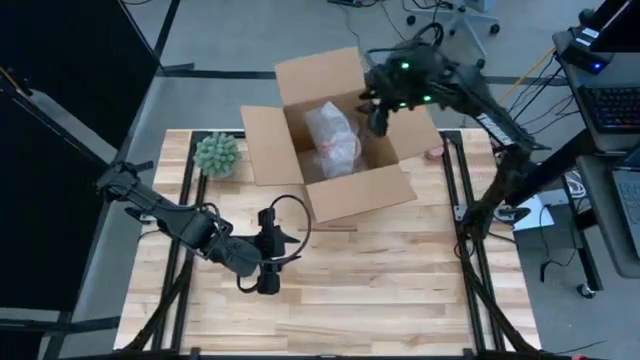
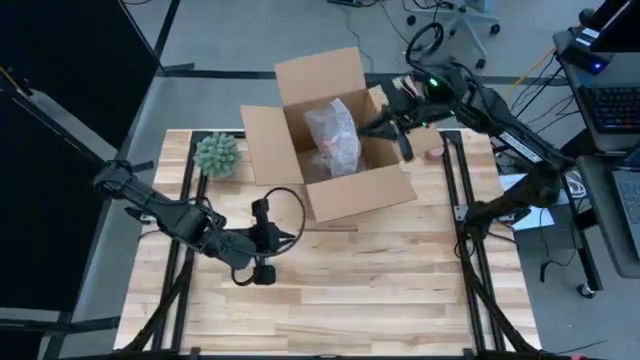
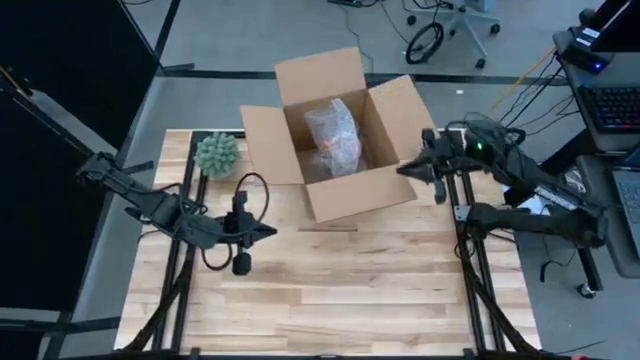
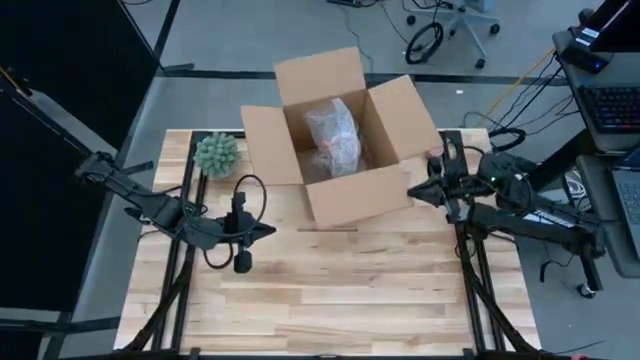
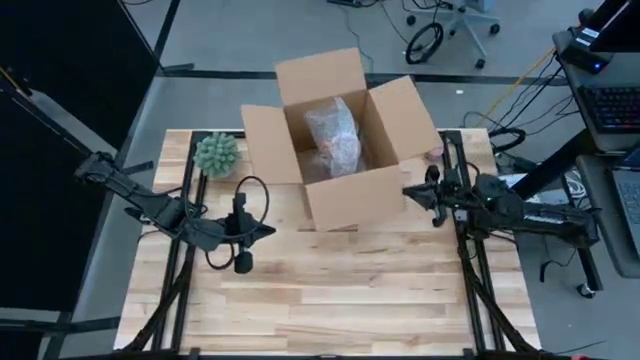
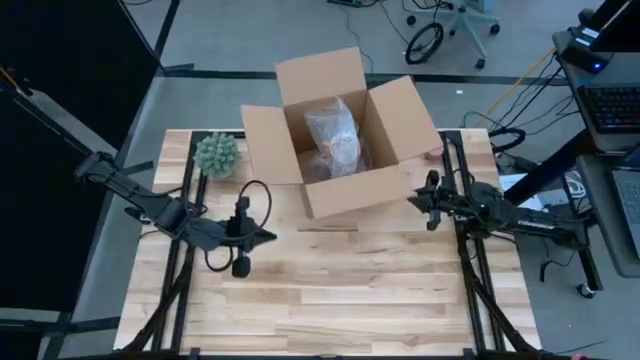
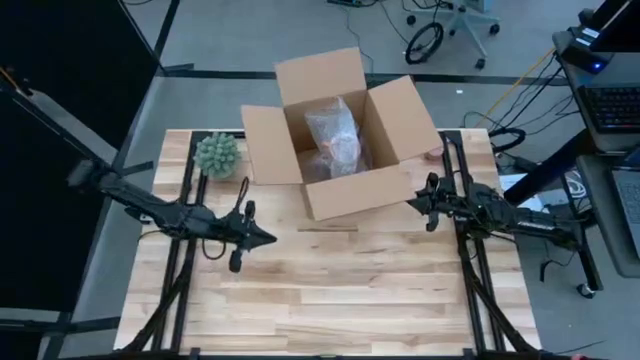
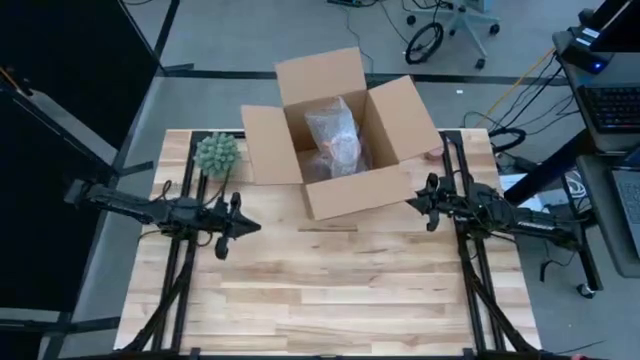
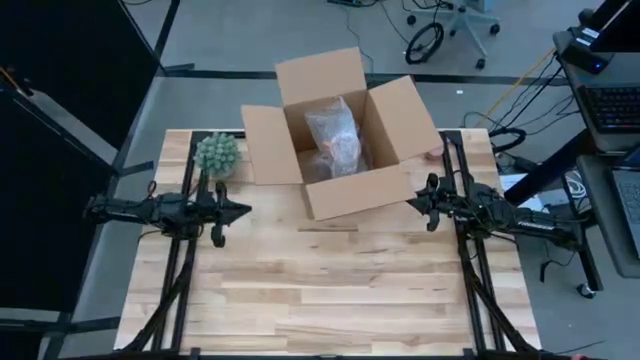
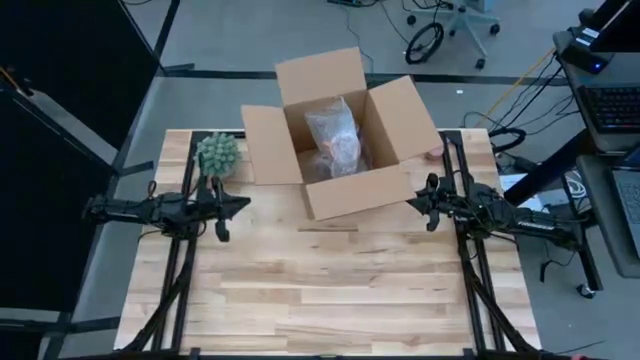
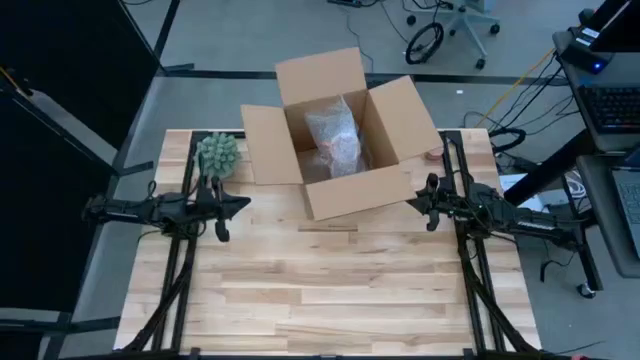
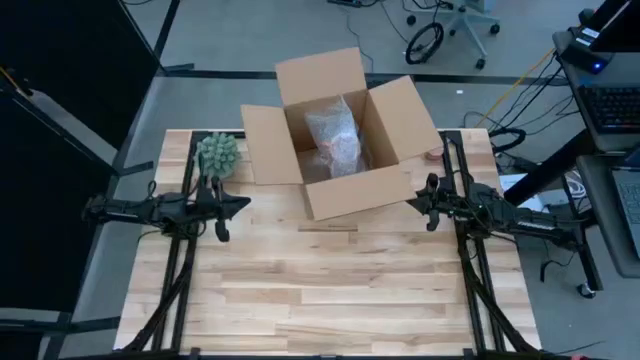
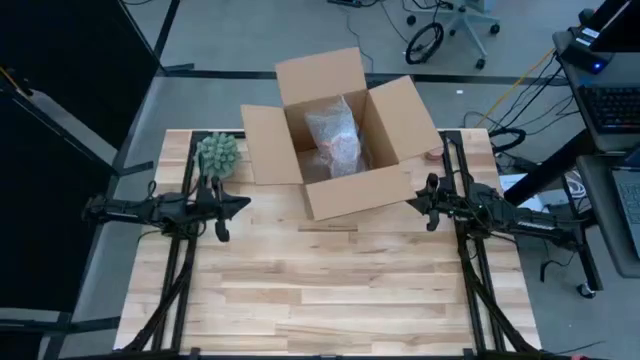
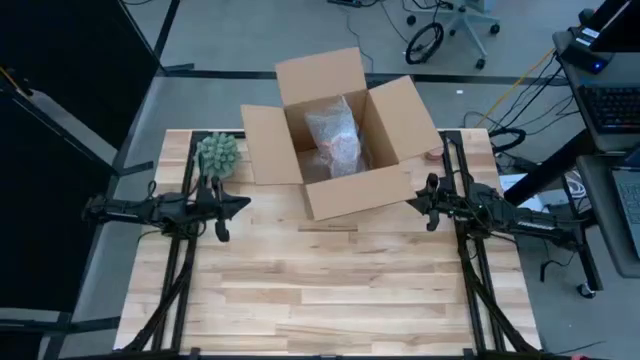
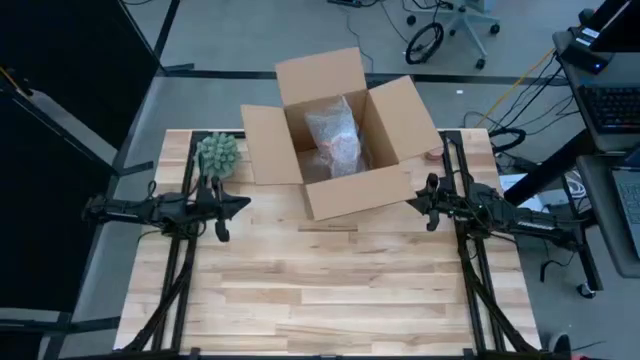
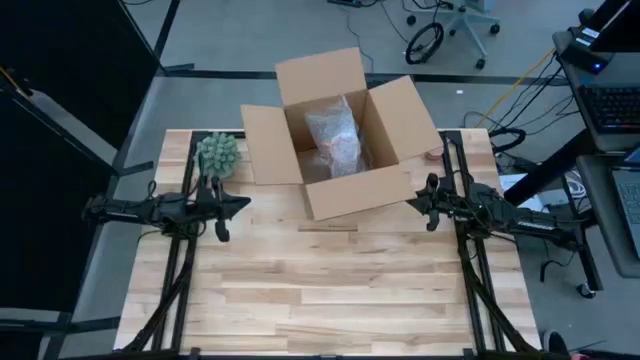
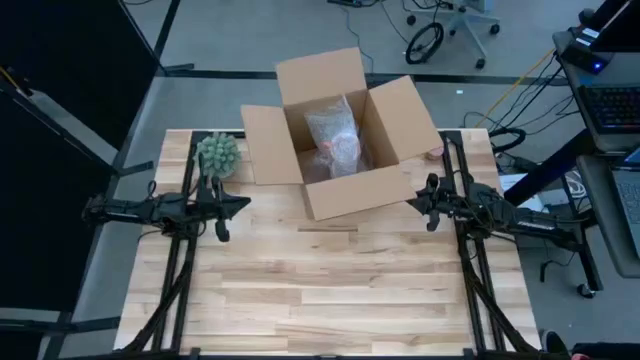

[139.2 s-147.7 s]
Task: wrap mug
Return to Home Position

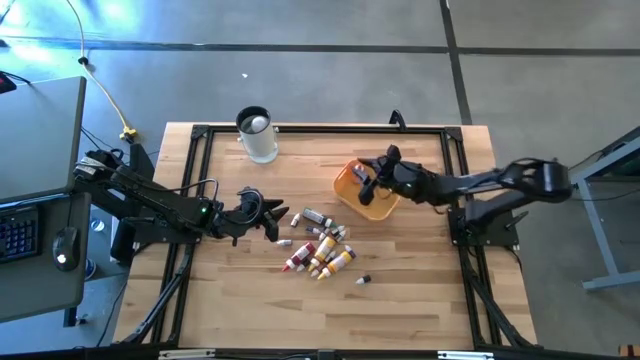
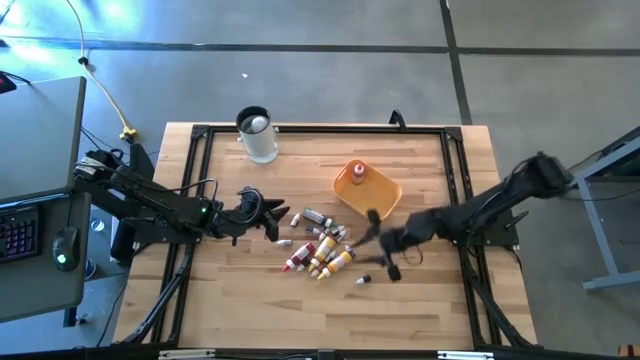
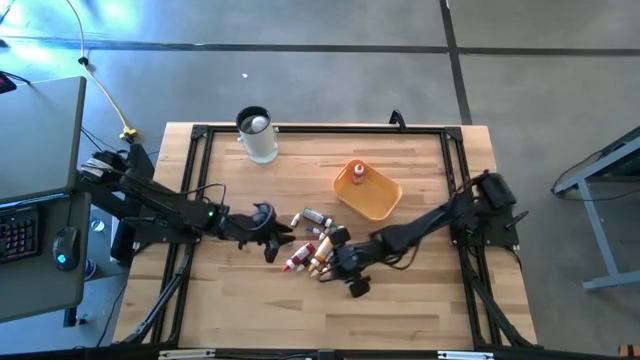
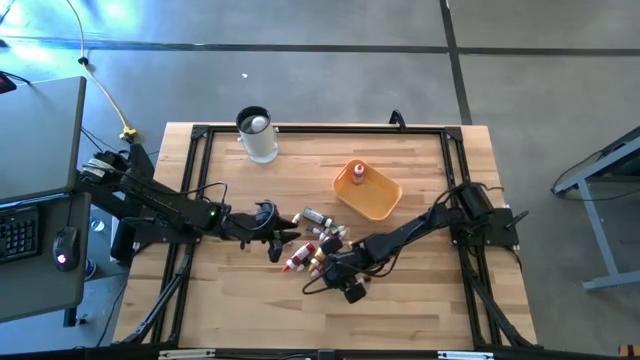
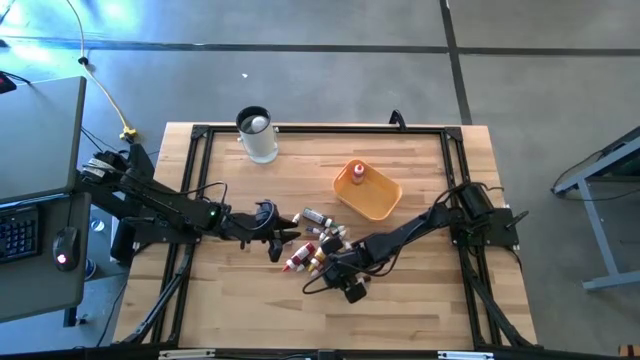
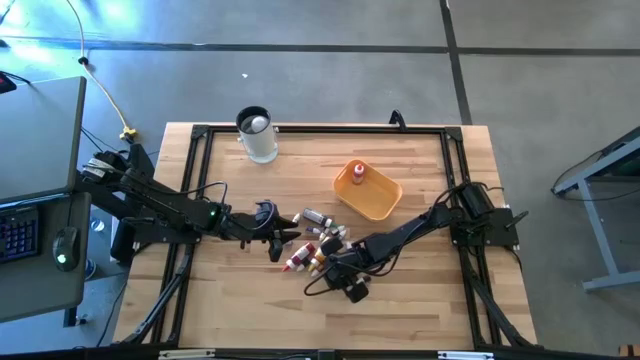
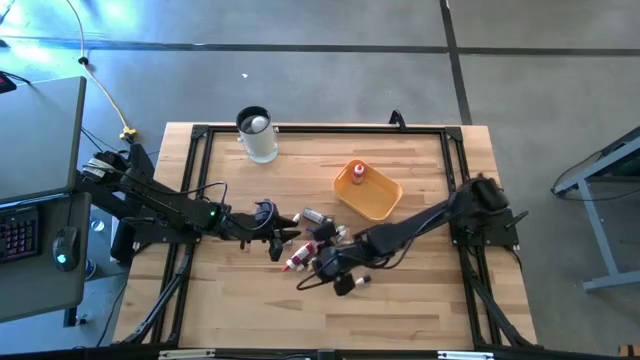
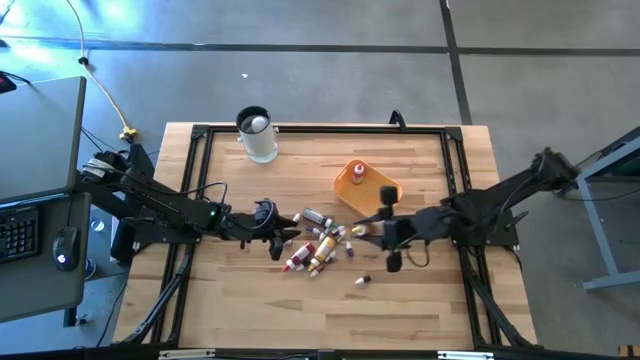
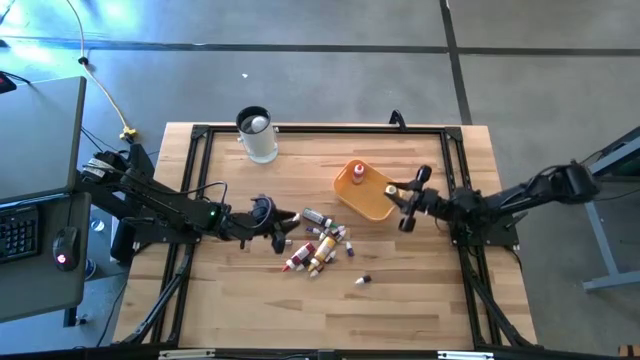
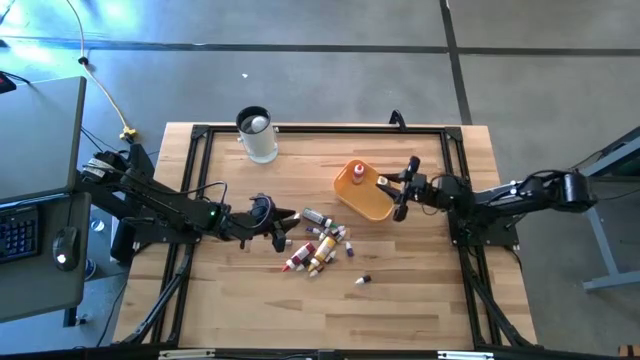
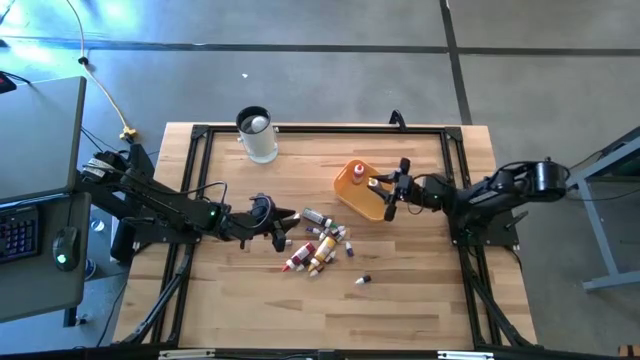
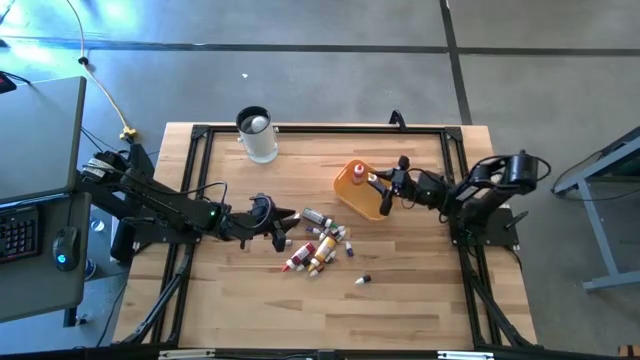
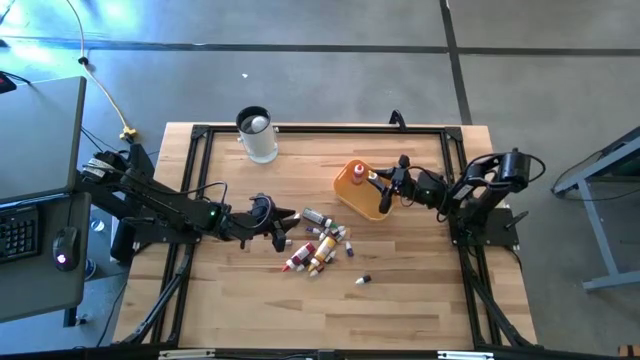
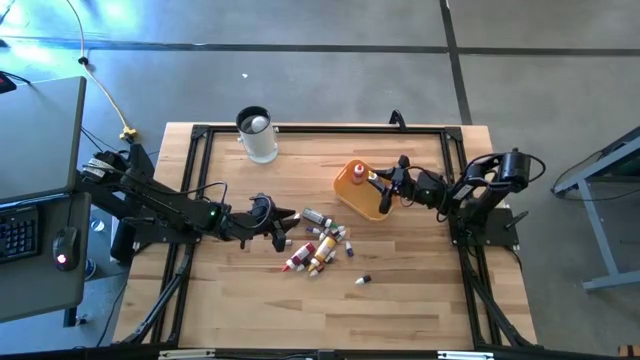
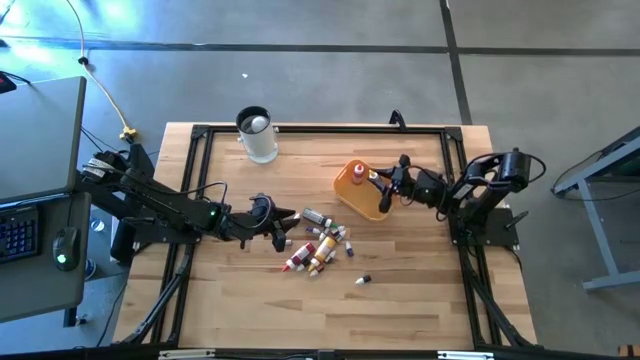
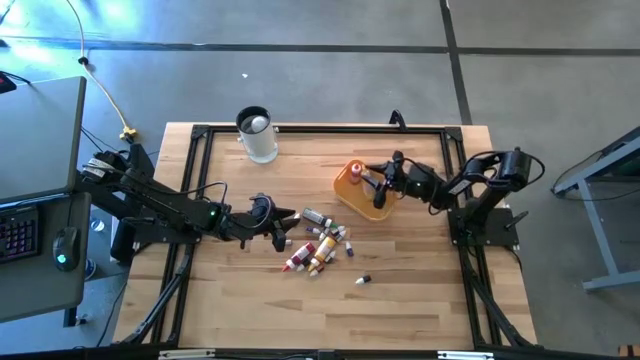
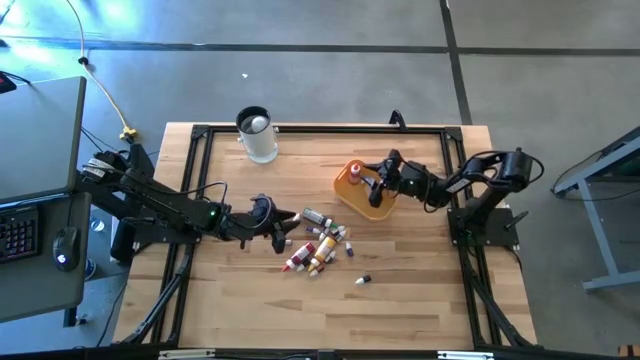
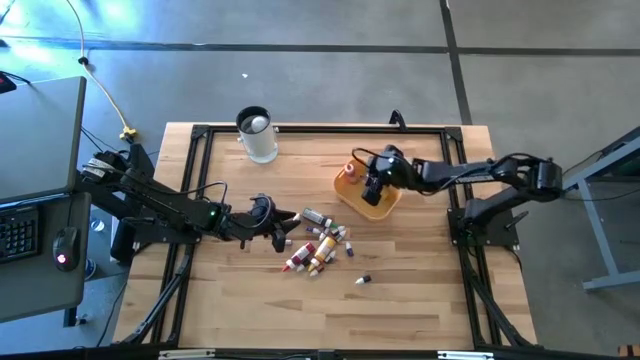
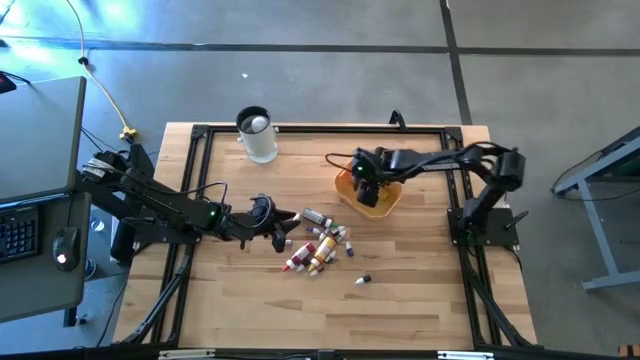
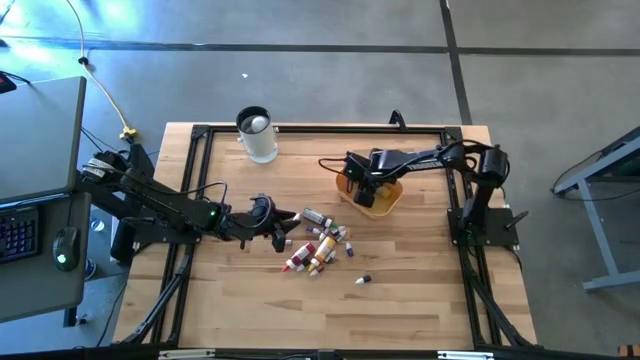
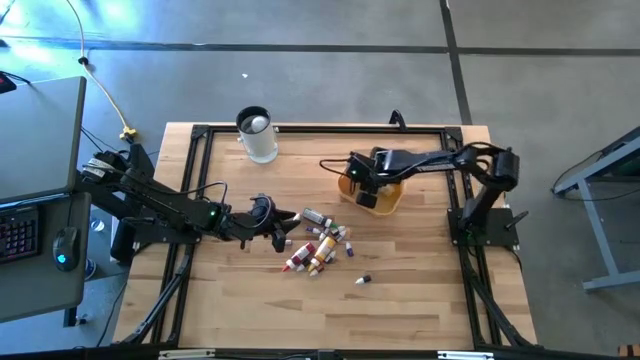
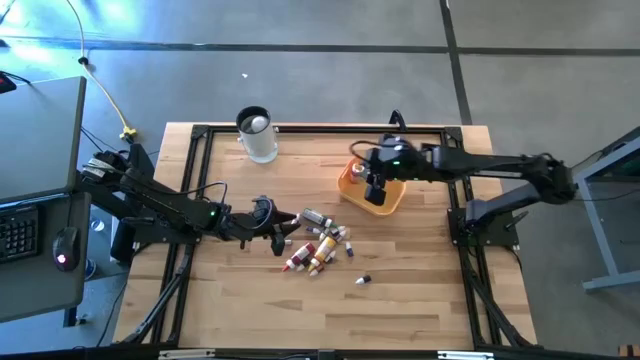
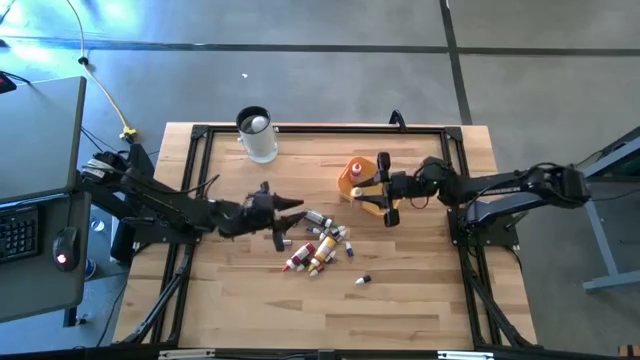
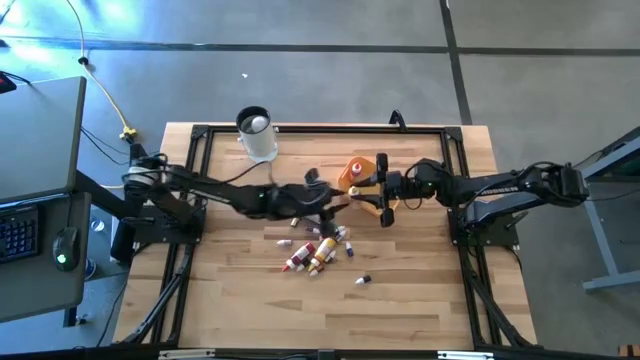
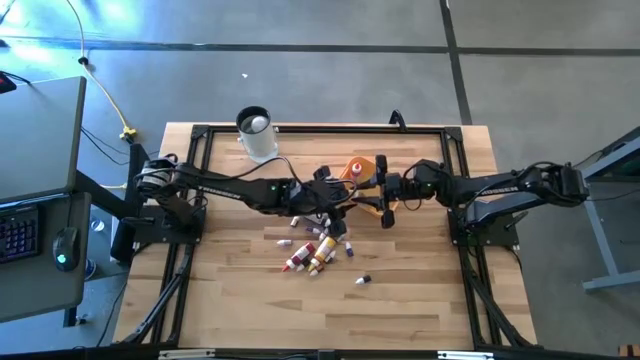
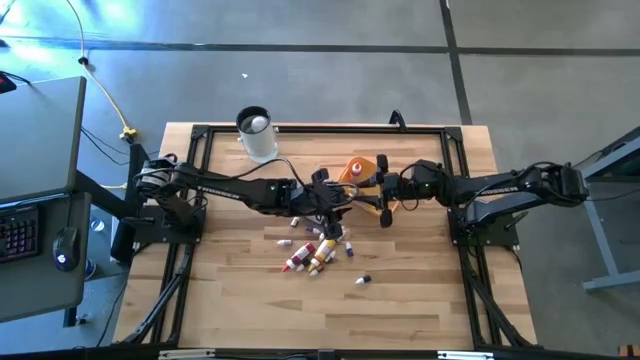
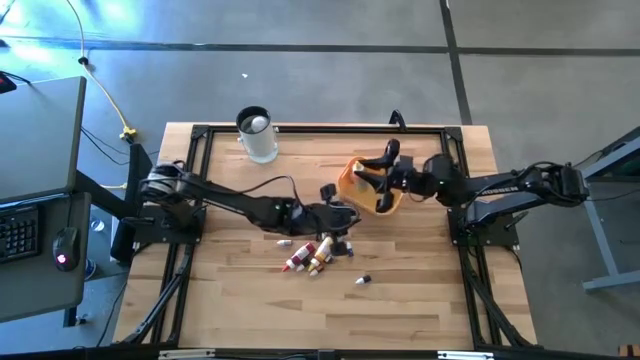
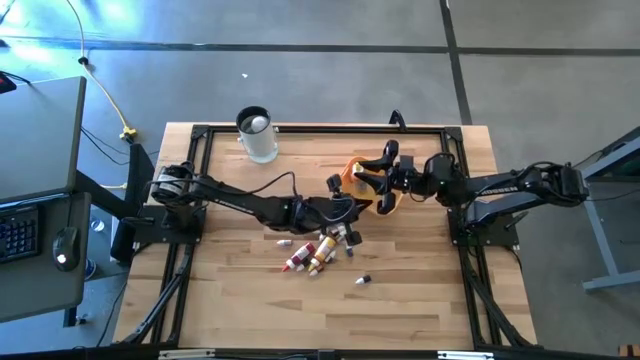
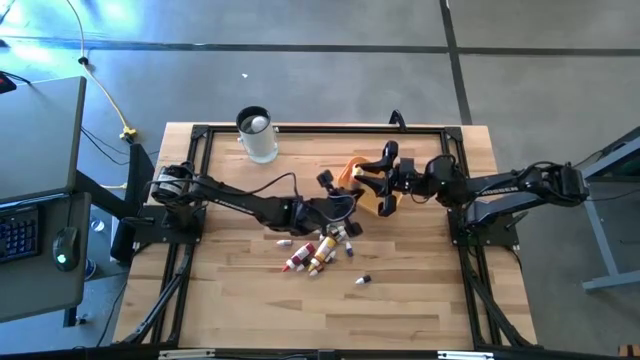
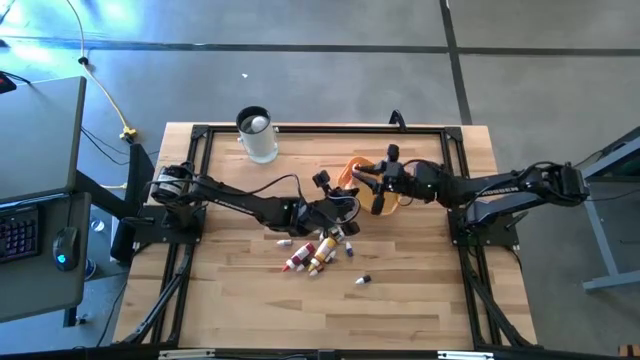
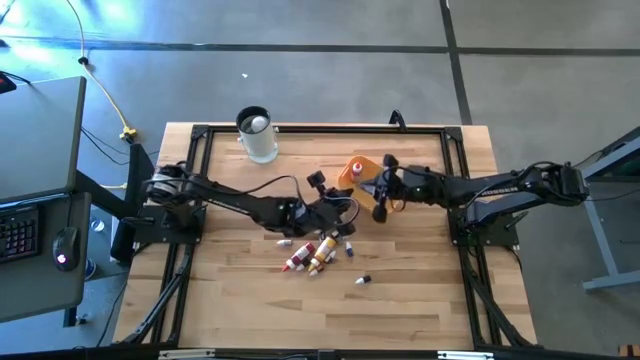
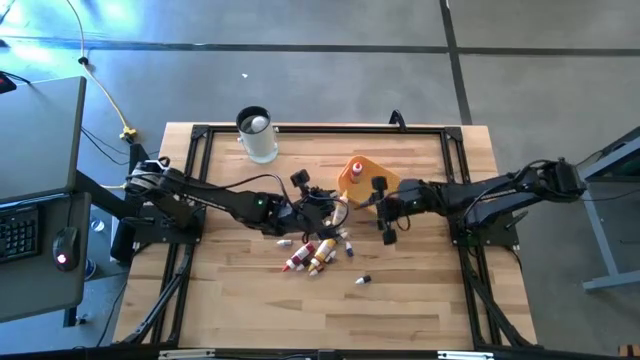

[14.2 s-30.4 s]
Task: Pick & Place food coloring
Put the right large yellow food coloring bottle into the yellow bin
